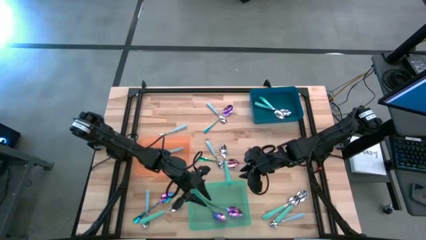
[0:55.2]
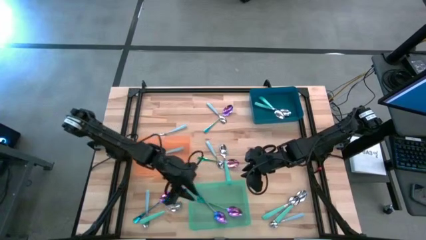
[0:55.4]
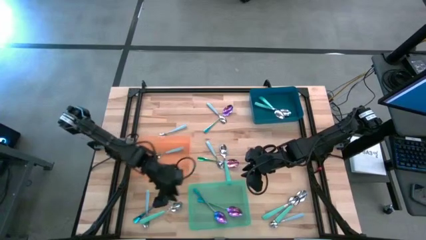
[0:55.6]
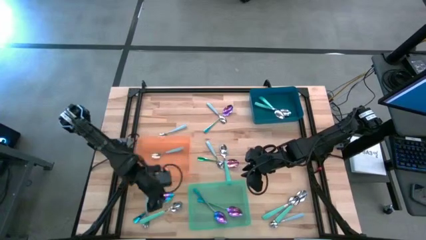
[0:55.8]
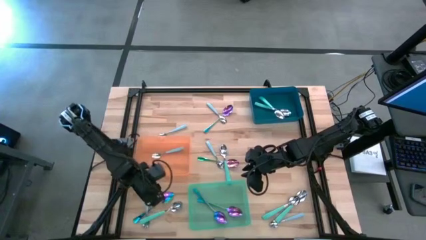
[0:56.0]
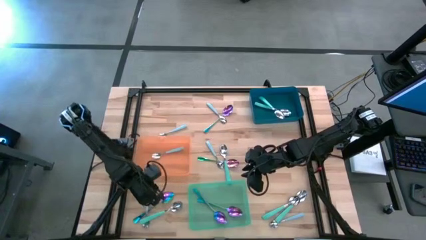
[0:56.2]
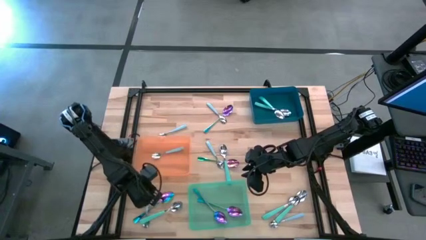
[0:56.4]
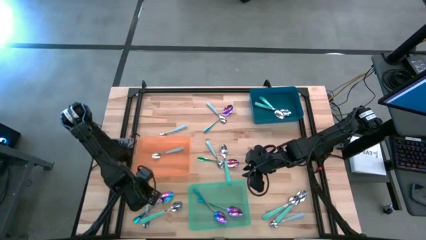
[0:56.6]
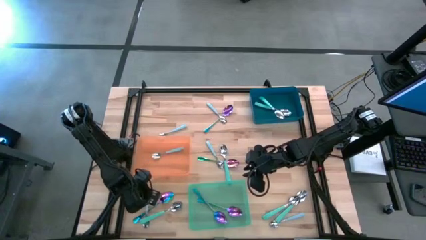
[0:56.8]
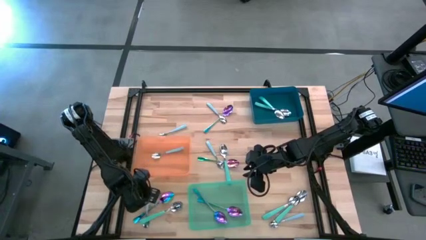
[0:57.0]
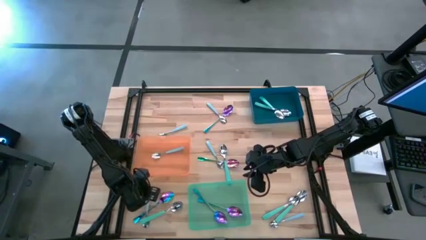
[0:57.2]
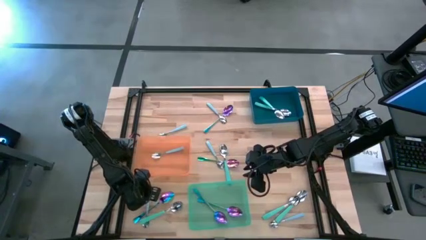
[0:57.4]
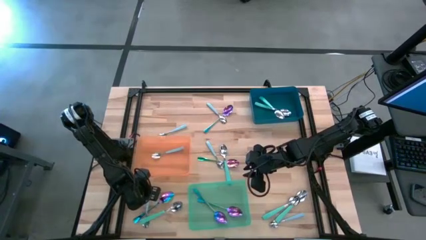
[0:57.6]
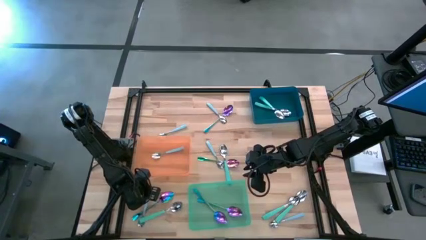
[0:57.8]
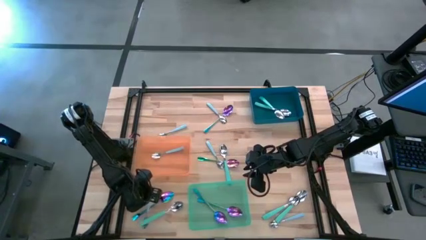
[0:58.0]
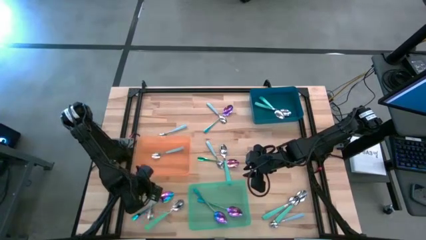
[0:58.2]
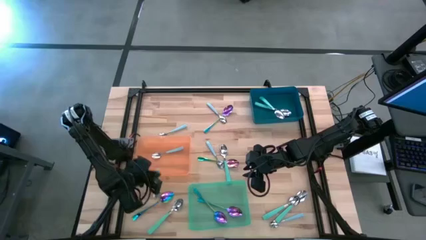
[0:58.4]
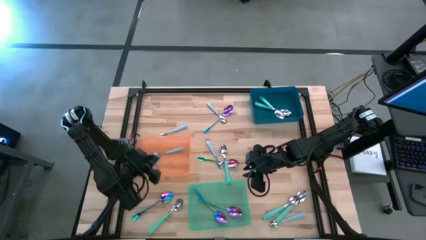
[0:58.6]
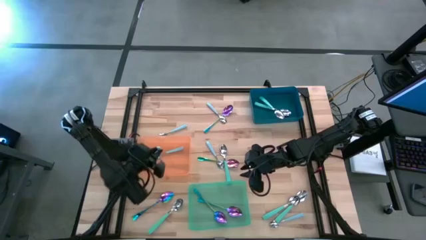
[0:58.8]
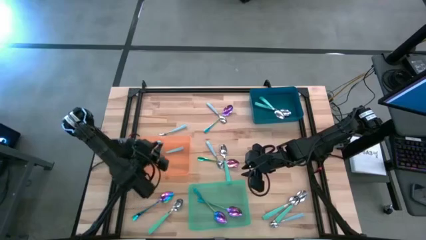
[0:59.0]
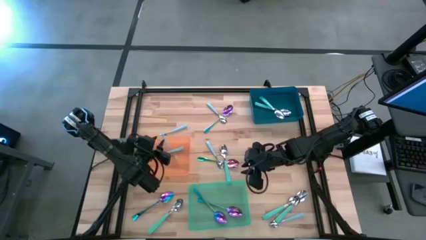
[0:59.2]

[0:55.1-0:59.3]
Task: Sort silverware by color (type)
Put the bottom left blue spoon into the orange bin

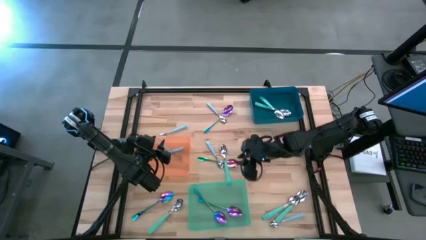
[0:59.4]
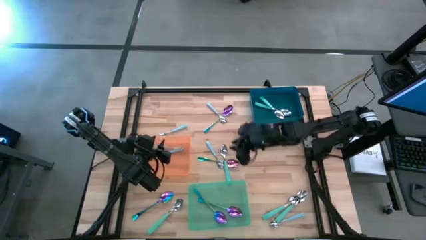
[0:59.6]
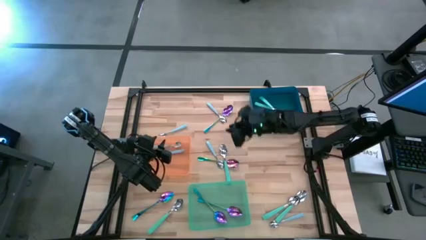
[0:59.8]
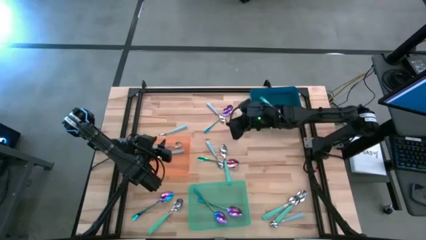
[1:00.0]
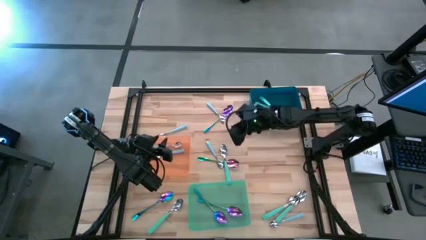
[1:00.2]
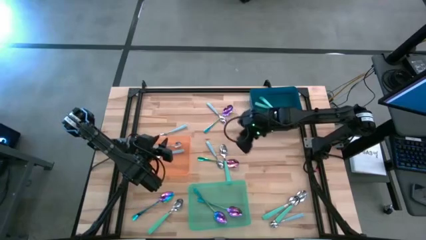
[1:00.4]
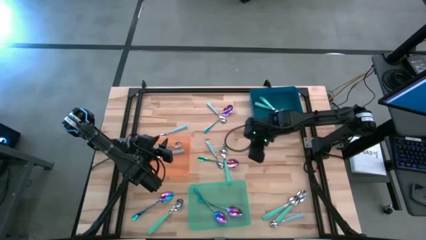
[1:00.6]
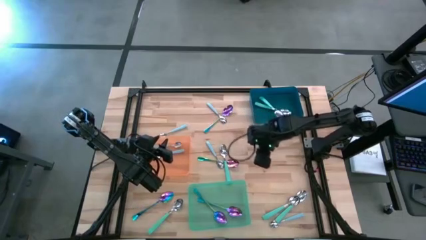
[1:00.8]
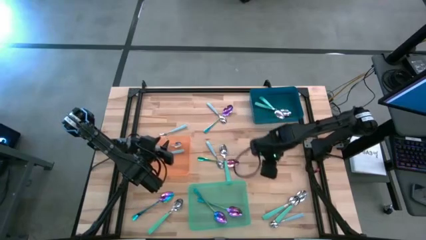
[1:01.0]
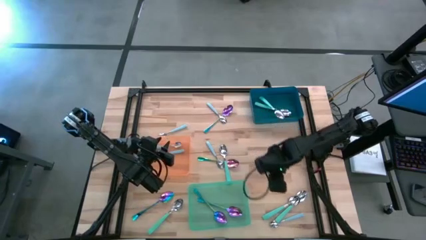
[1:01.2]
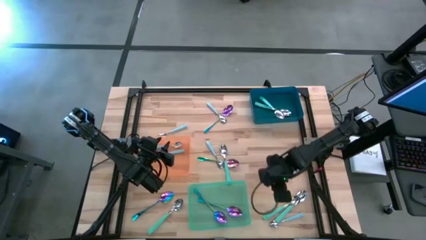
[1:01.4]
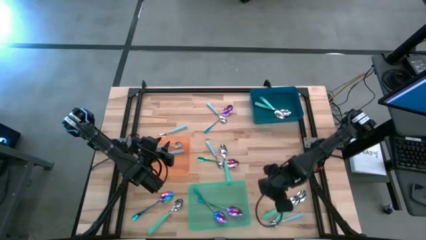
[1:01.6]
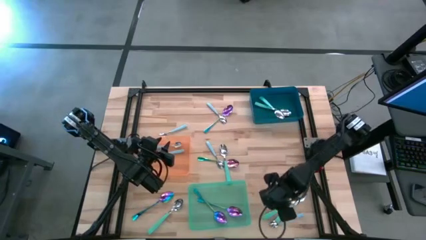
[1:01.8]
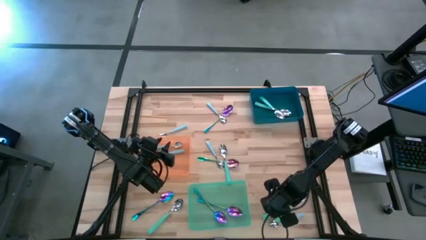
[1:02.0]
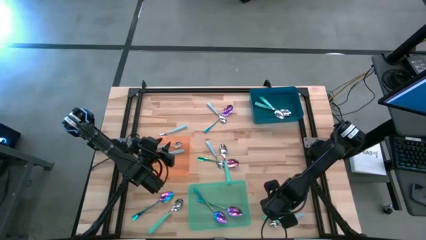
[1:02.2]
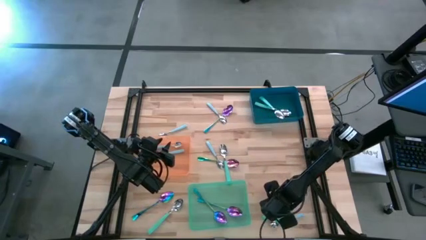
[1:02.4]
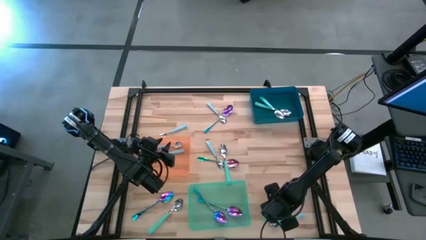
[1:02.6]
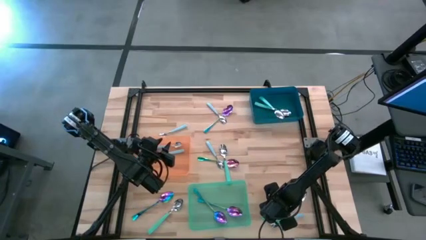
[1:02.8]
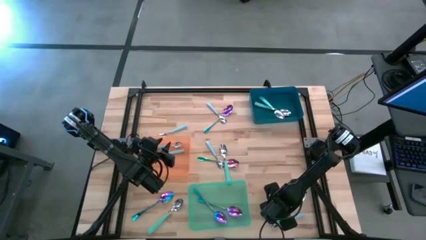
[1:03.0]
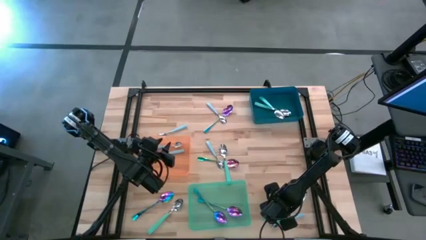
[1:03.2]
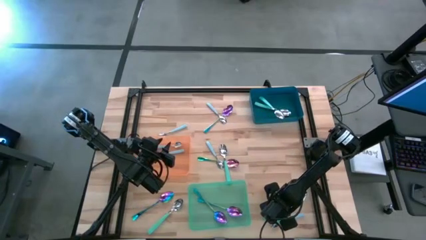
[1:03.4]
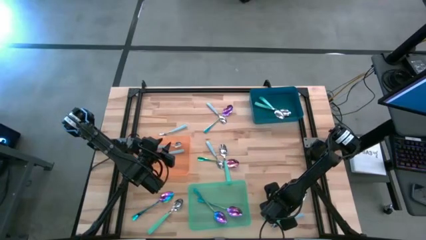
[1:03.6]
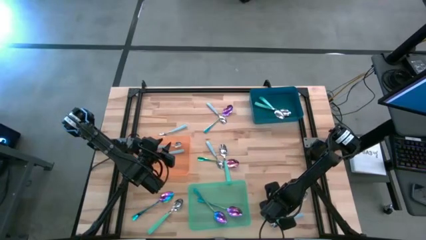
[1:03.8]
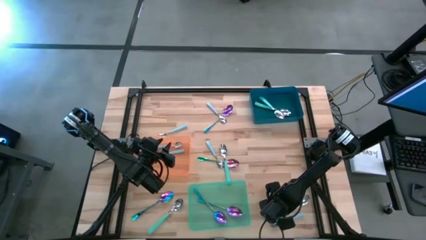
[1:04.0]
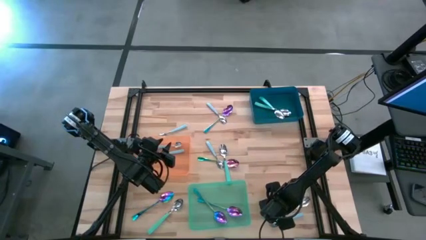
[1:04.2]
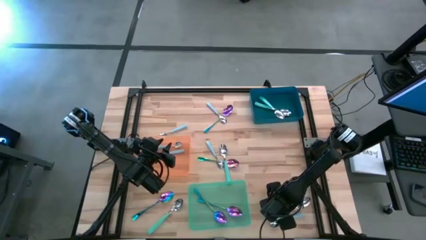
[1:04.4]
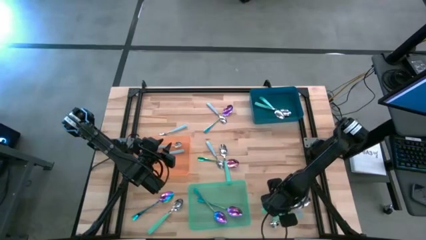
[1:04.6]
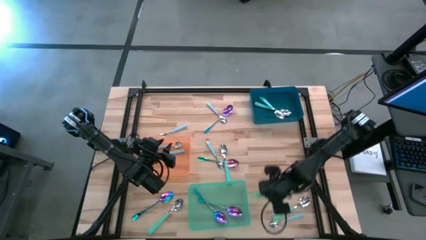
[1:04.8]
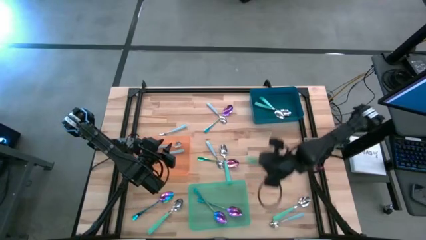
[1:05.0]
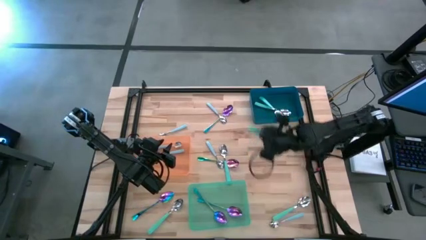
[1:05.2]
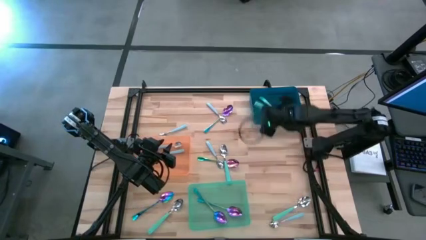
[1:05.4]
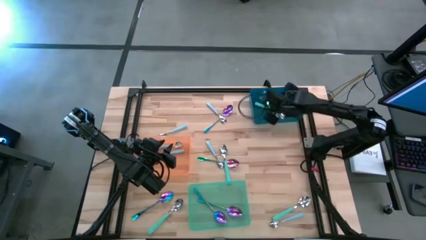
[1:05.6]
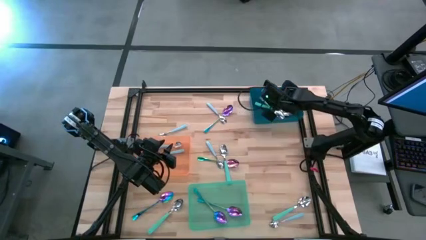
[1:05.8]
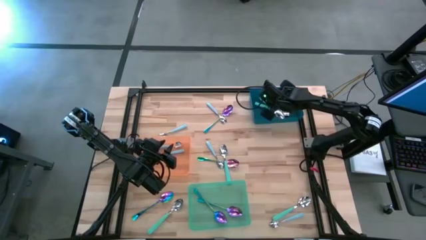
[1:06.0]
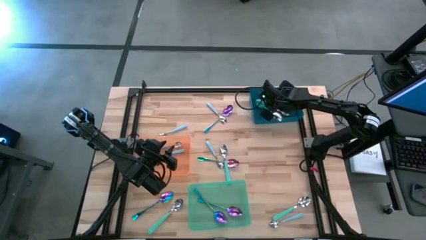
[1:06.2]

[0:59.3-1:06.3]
Put the bottom right green spoon into the blue bin

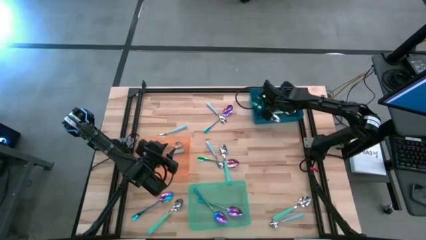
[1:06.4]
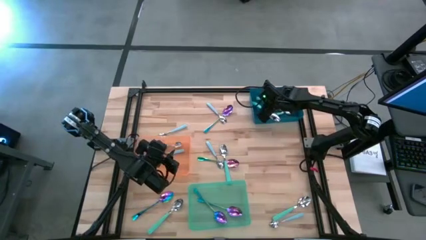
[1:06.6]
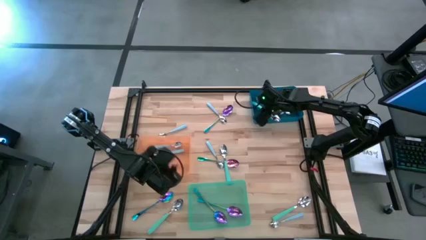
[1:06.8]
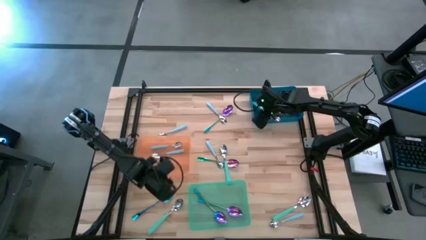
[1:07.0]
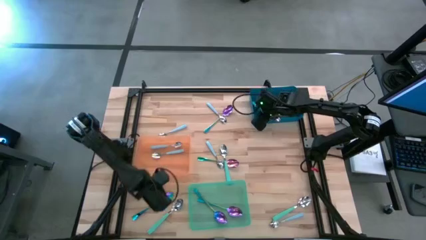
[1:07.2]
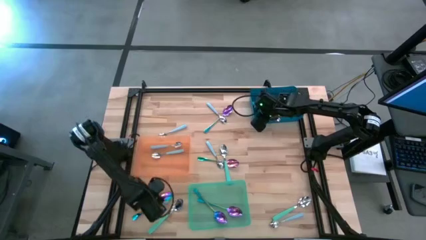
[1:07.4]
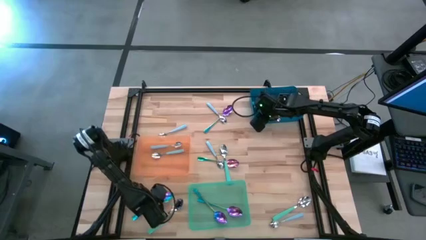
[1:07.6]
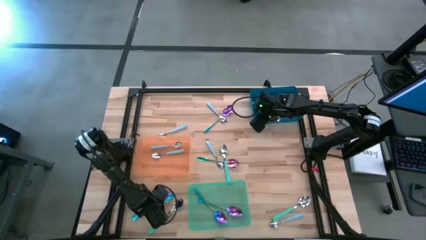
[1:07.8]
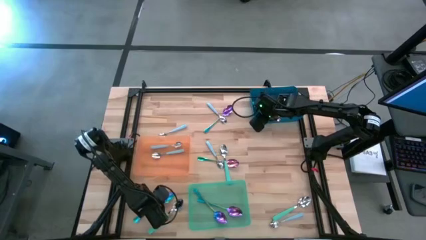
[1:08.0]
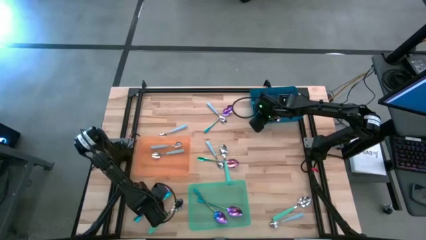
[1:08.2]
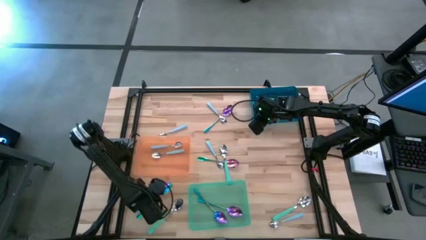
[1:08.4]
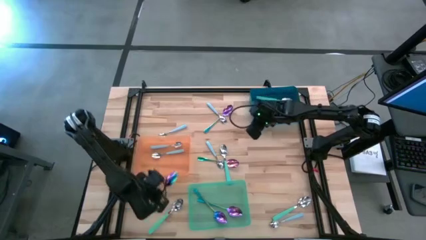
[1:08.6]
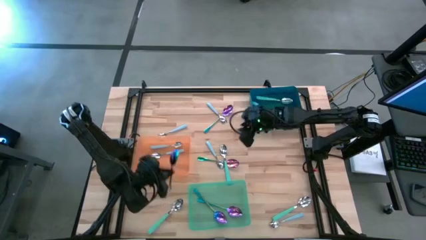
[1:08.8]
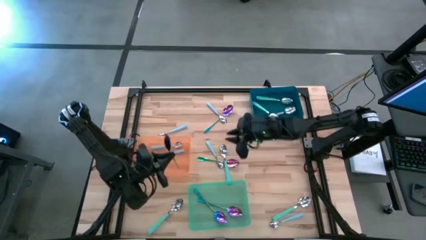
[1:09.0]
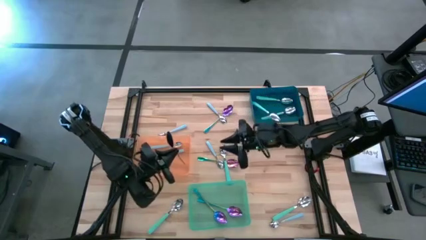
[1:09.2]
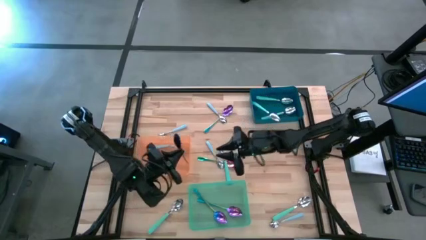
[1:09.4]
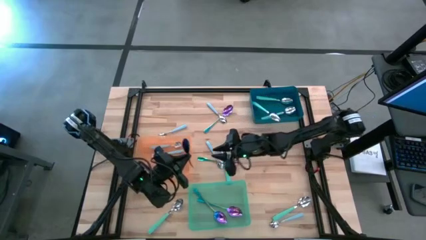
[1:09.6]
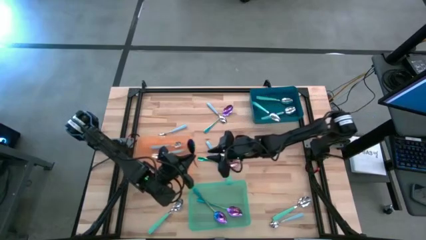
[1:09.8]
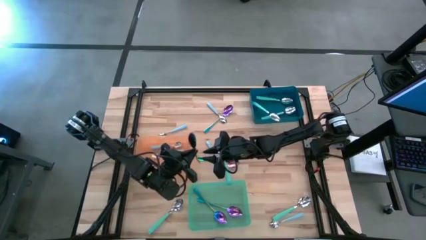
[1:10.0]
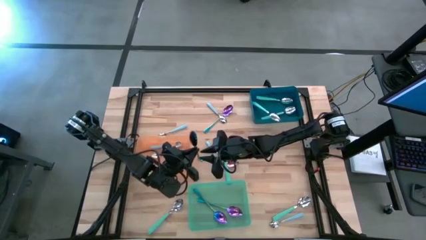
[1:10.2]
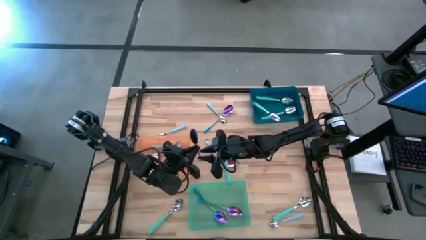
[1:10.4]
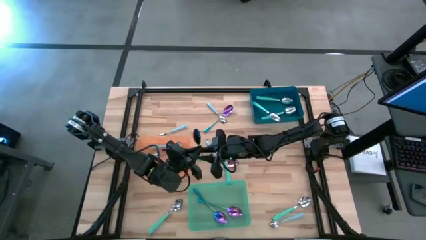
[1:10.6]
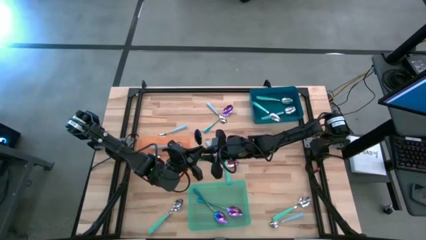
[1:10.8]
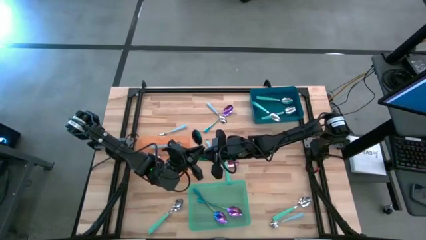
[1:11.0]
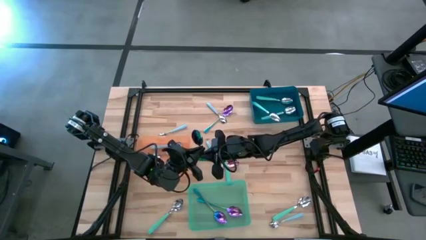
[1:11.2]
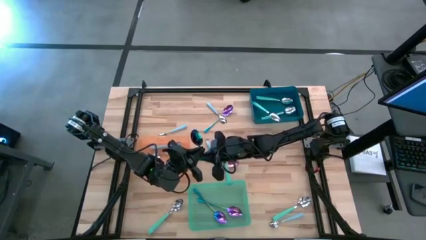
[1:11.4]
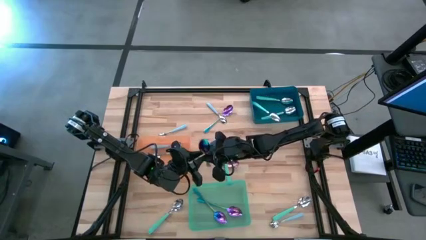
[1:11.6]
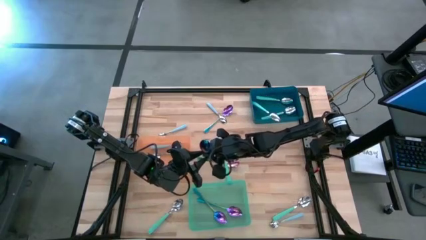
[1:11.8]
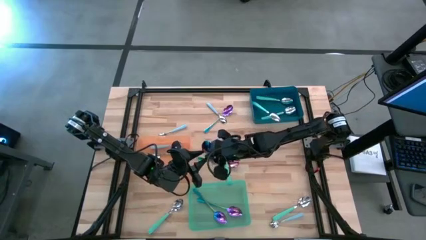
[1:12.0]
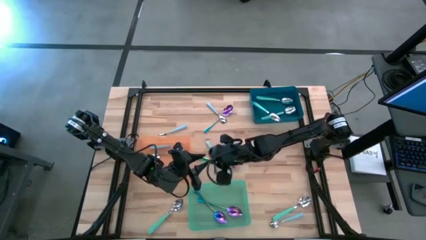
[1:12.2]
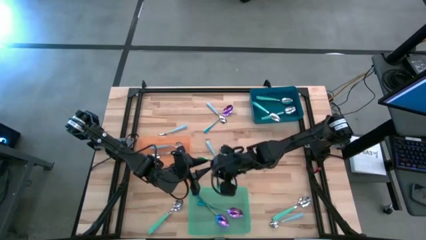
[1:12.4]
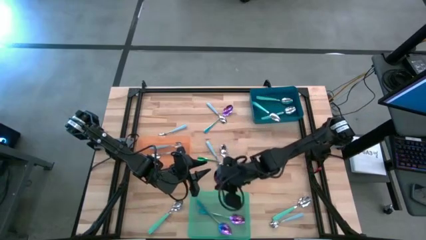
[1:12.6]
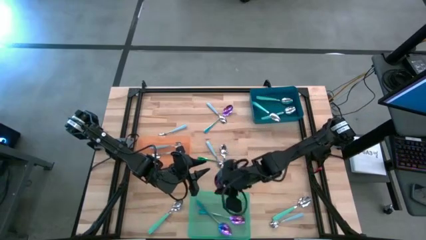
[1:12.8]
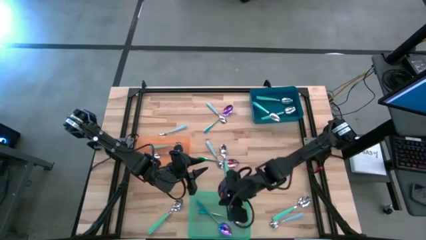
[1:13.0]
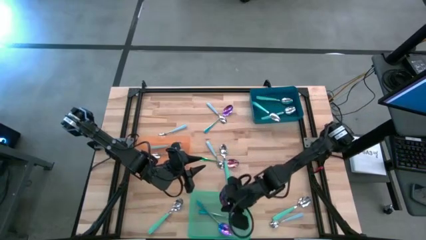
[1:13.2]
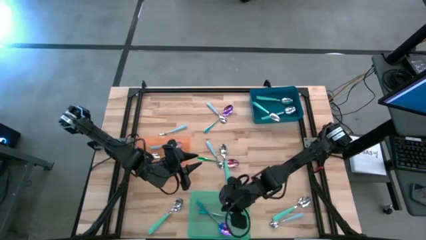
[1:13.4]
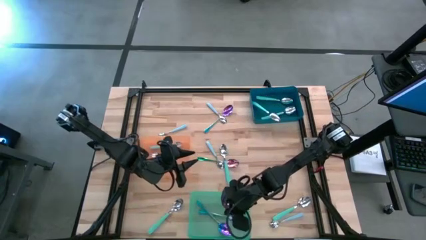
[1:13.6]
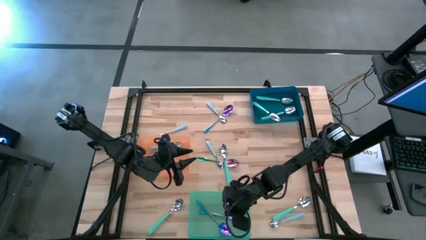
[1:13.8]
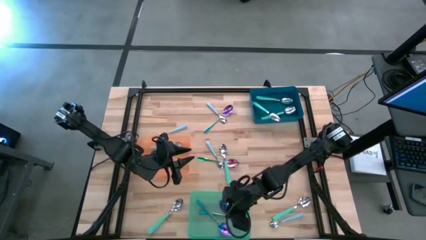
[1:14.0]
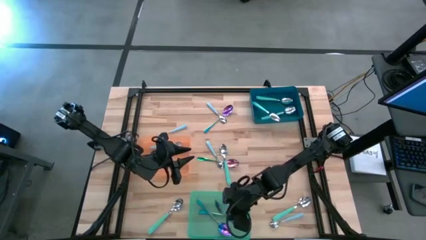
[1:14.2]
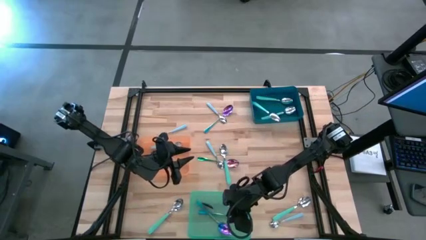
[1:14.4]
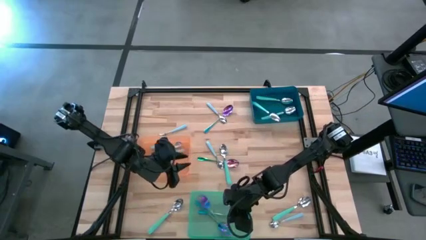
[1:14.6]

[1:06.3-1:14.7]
Put the bottom left purple spoon into the green bin
